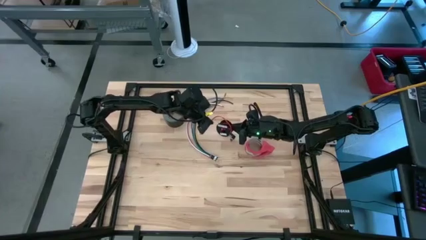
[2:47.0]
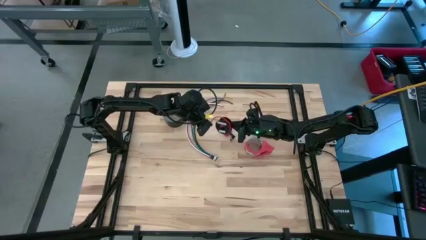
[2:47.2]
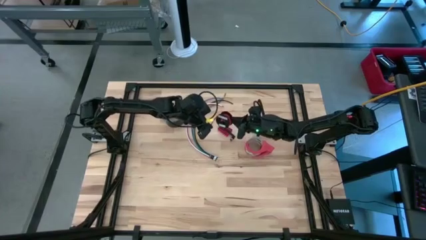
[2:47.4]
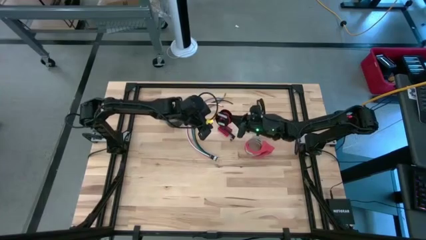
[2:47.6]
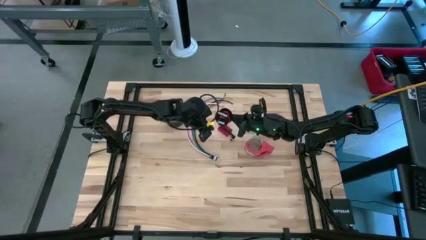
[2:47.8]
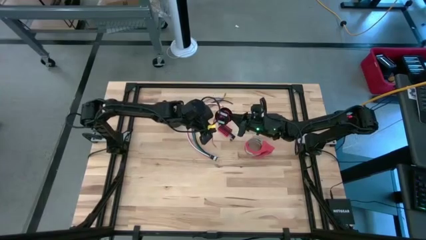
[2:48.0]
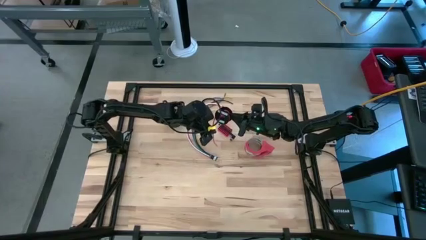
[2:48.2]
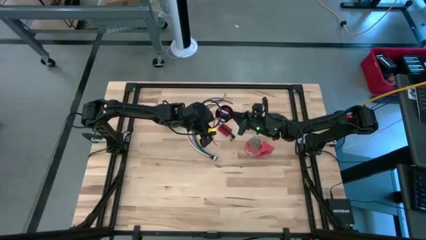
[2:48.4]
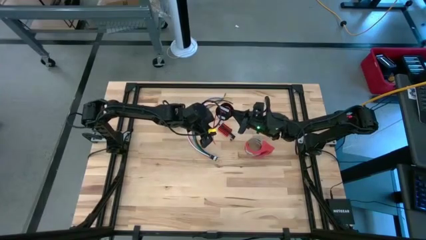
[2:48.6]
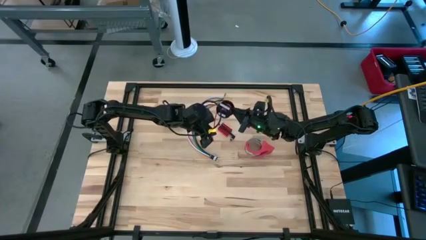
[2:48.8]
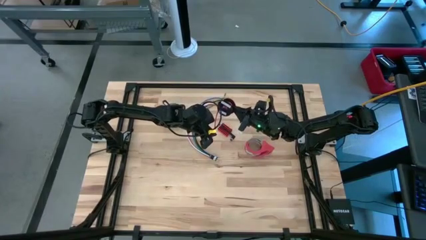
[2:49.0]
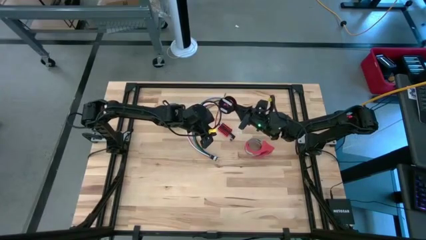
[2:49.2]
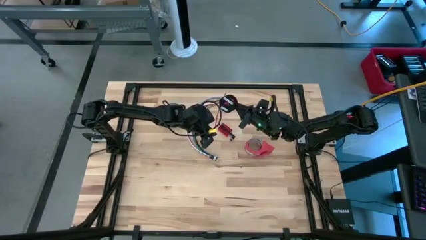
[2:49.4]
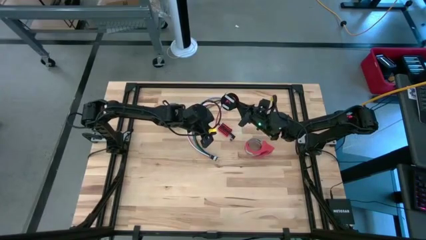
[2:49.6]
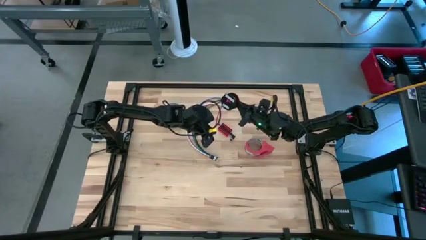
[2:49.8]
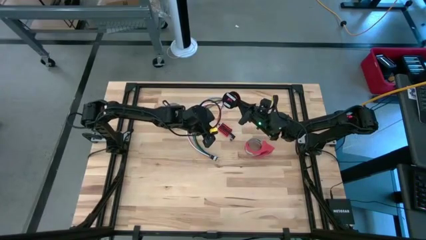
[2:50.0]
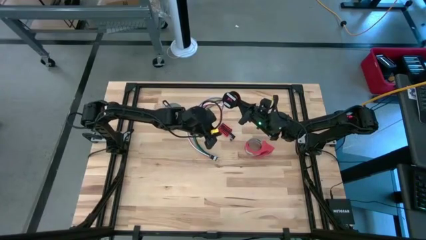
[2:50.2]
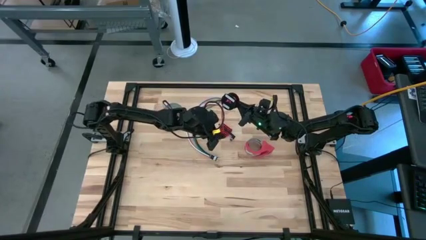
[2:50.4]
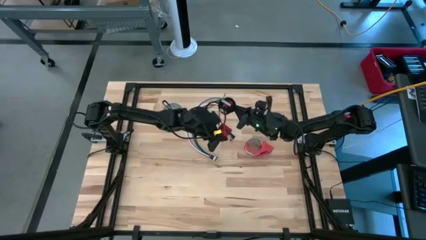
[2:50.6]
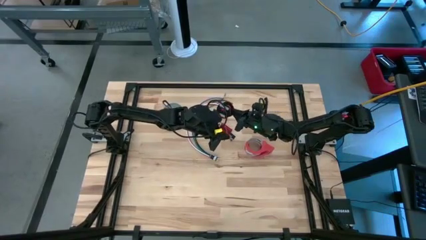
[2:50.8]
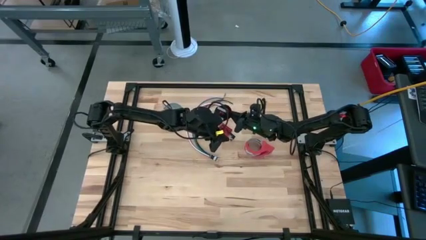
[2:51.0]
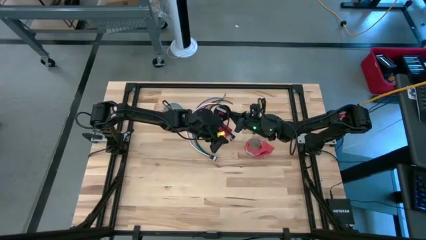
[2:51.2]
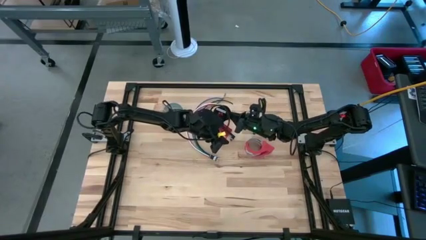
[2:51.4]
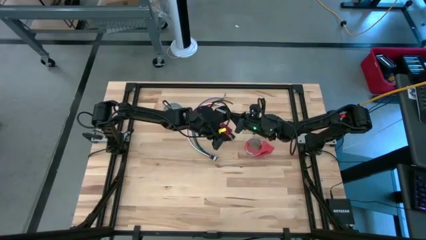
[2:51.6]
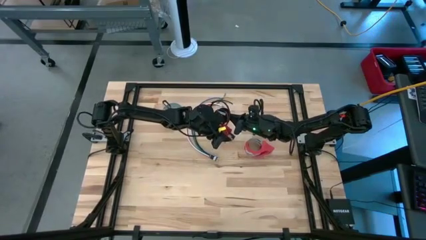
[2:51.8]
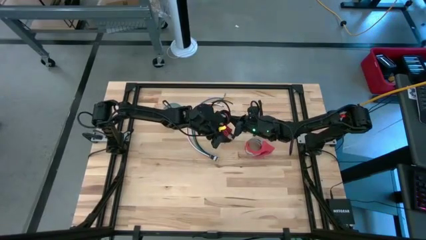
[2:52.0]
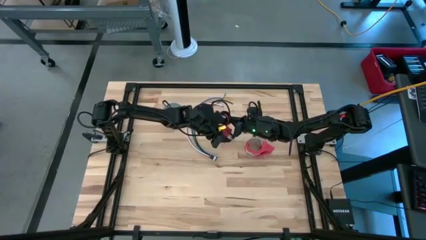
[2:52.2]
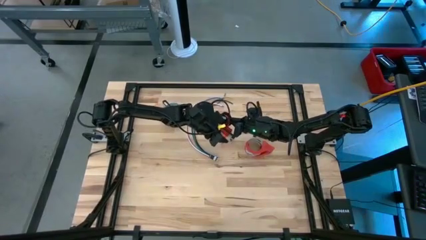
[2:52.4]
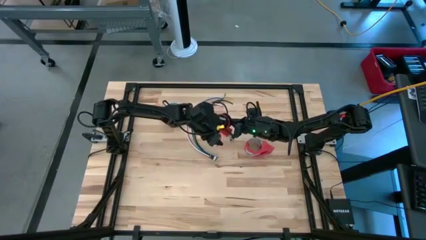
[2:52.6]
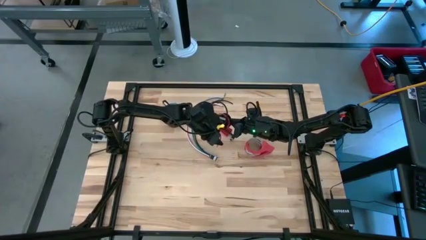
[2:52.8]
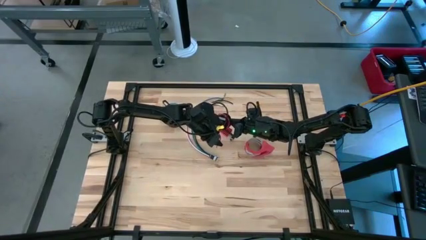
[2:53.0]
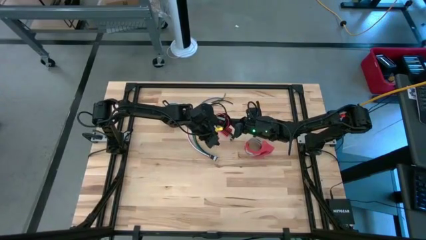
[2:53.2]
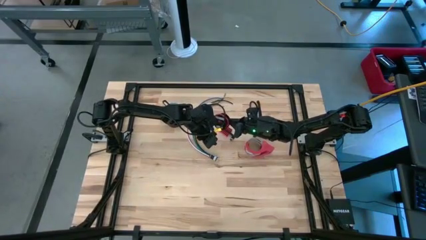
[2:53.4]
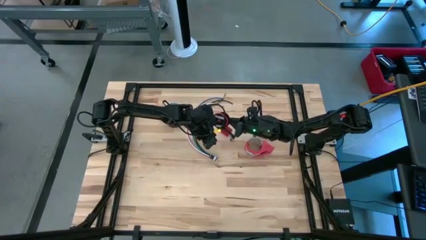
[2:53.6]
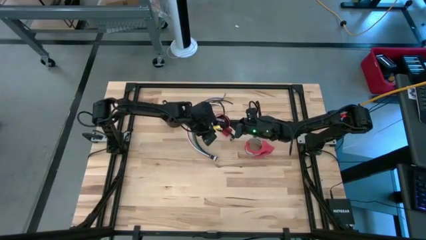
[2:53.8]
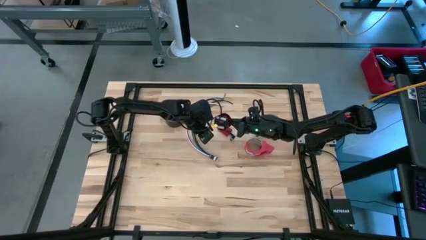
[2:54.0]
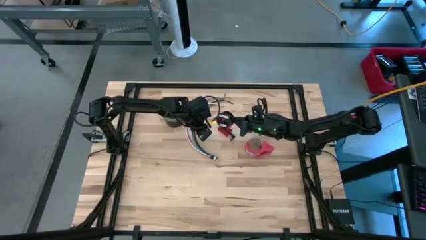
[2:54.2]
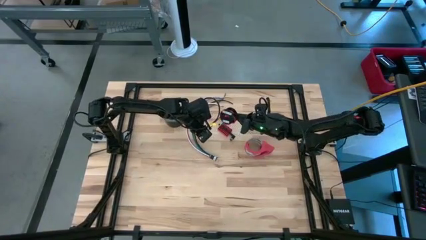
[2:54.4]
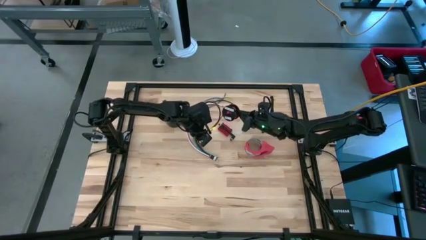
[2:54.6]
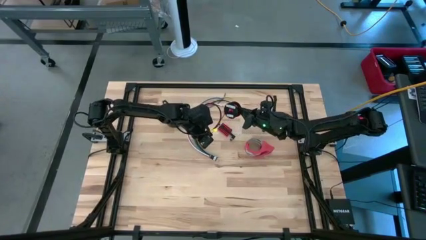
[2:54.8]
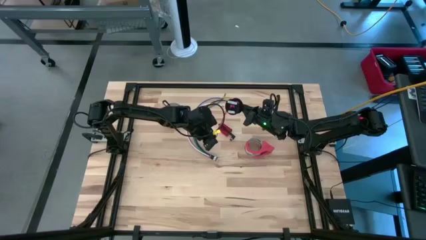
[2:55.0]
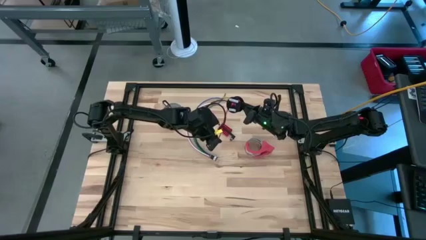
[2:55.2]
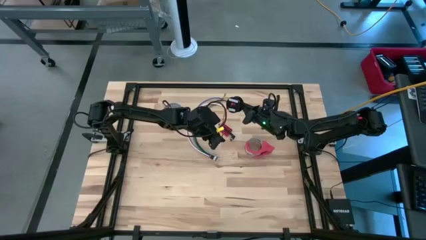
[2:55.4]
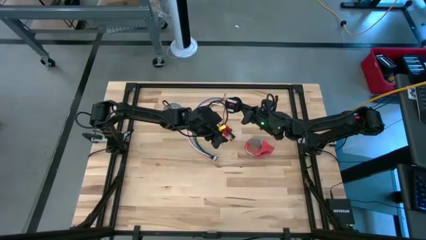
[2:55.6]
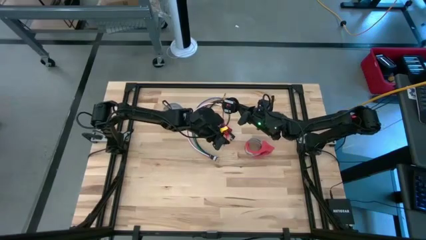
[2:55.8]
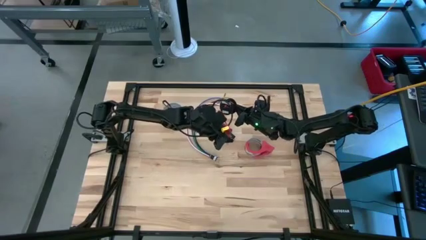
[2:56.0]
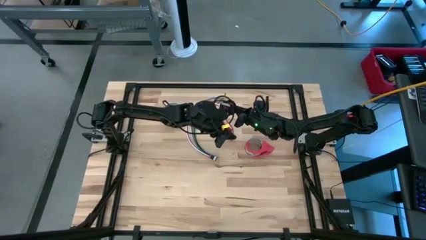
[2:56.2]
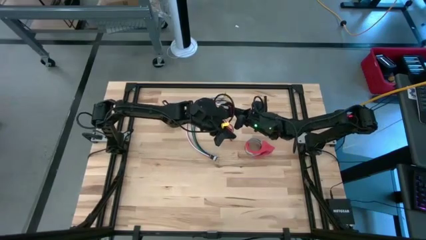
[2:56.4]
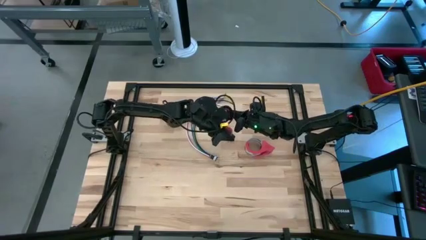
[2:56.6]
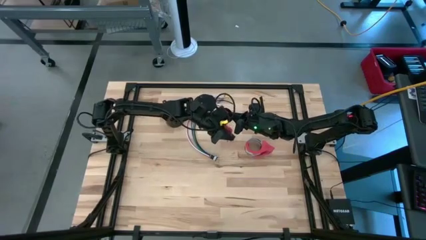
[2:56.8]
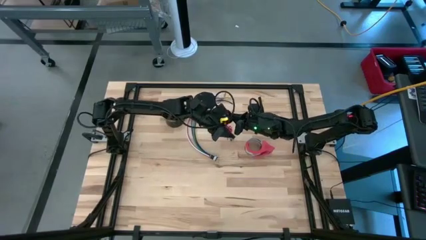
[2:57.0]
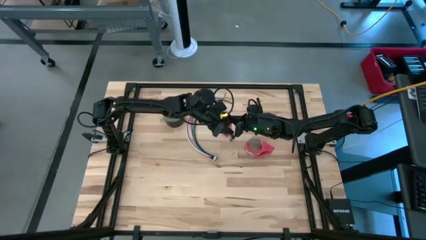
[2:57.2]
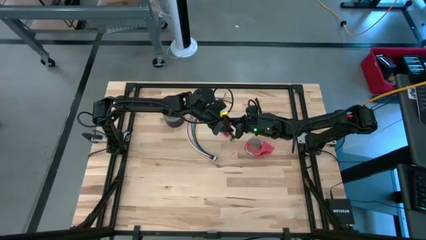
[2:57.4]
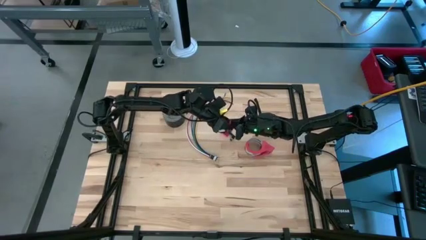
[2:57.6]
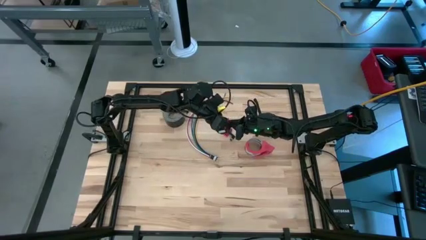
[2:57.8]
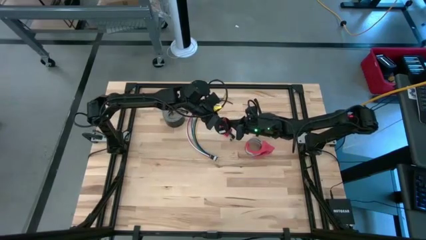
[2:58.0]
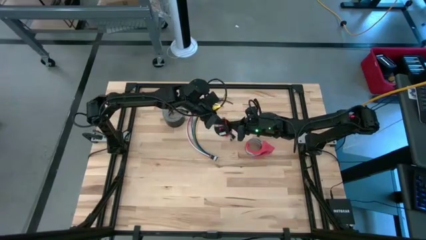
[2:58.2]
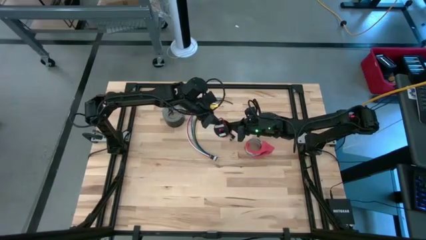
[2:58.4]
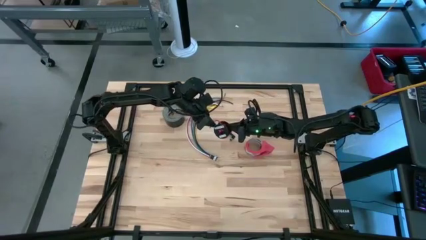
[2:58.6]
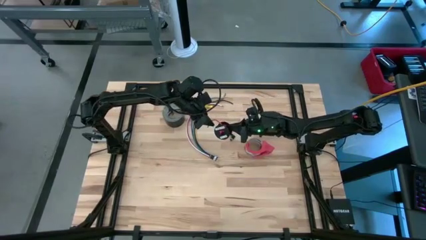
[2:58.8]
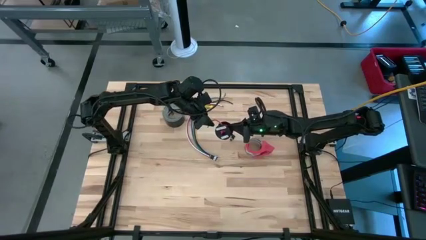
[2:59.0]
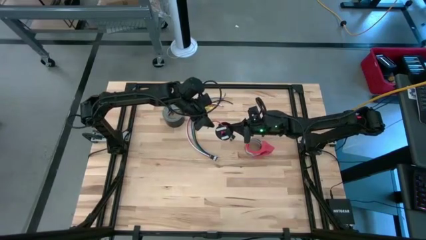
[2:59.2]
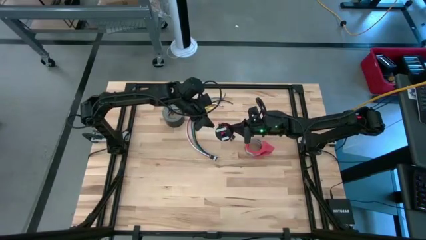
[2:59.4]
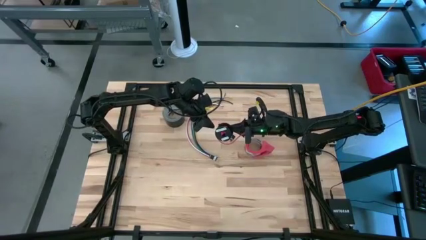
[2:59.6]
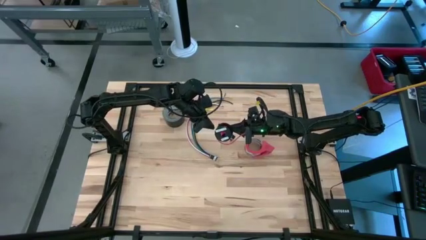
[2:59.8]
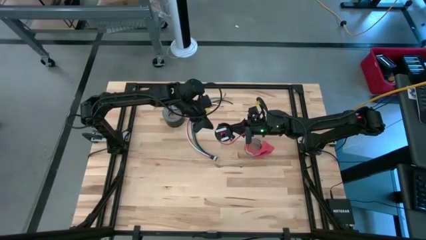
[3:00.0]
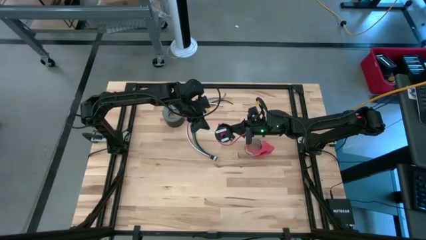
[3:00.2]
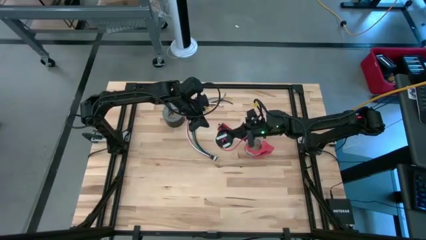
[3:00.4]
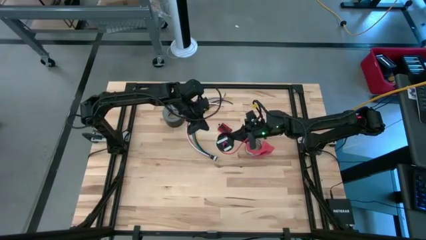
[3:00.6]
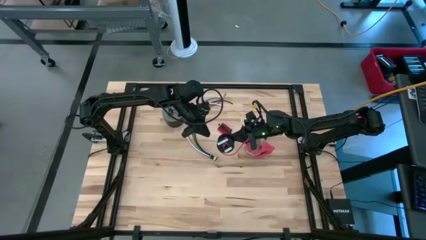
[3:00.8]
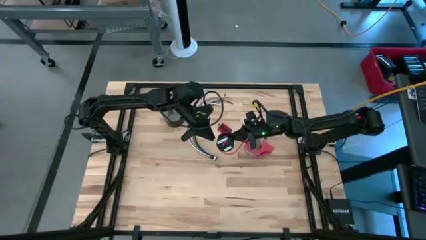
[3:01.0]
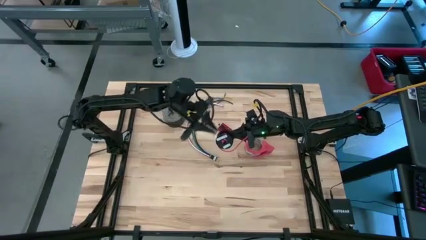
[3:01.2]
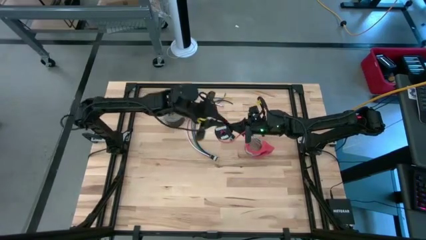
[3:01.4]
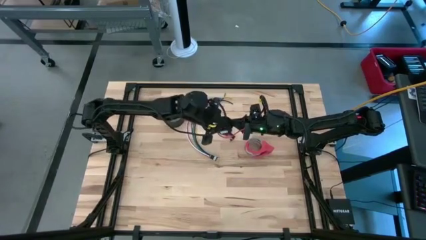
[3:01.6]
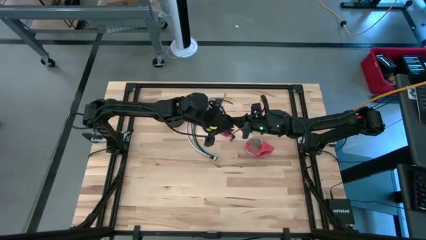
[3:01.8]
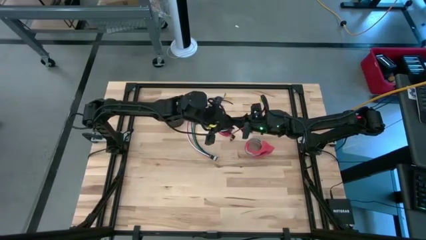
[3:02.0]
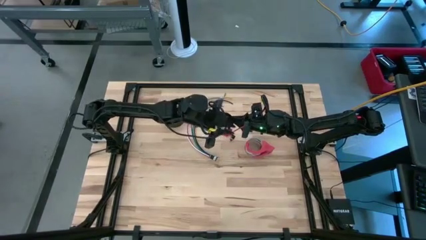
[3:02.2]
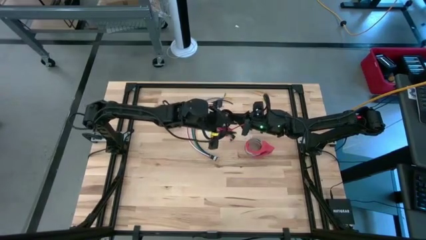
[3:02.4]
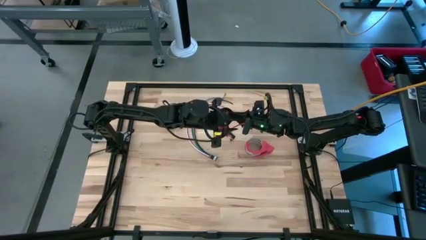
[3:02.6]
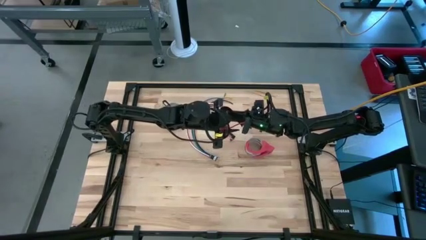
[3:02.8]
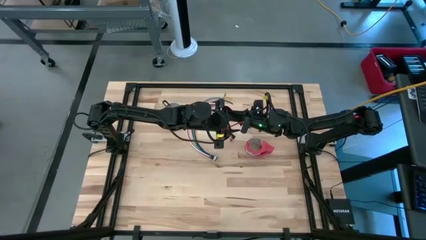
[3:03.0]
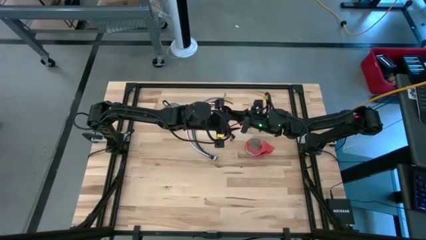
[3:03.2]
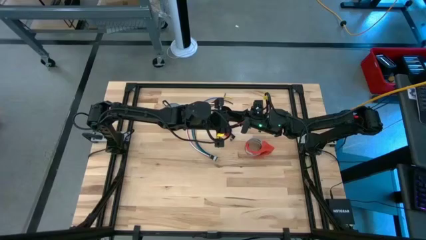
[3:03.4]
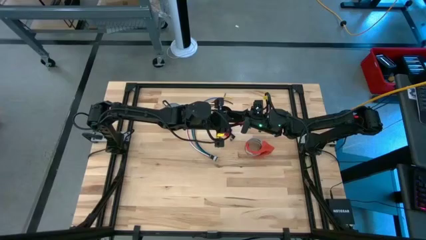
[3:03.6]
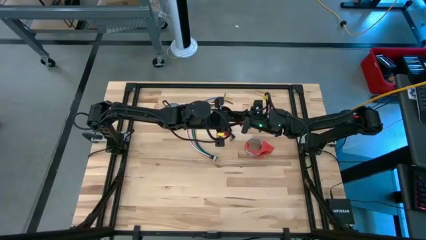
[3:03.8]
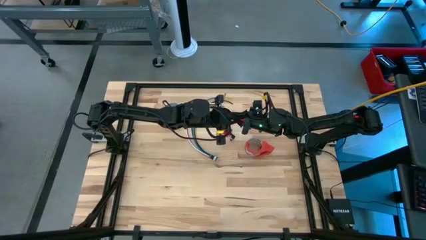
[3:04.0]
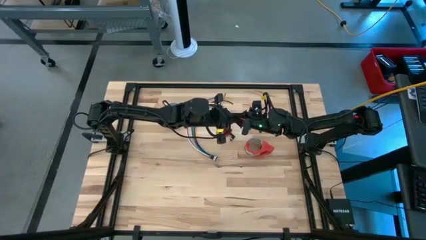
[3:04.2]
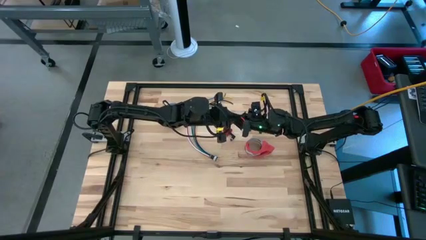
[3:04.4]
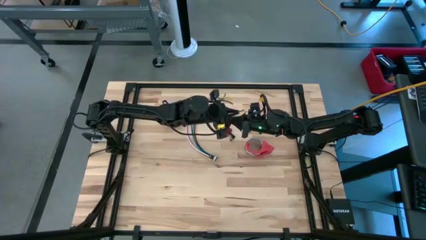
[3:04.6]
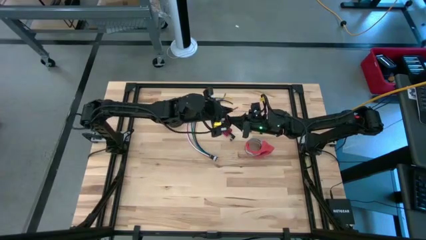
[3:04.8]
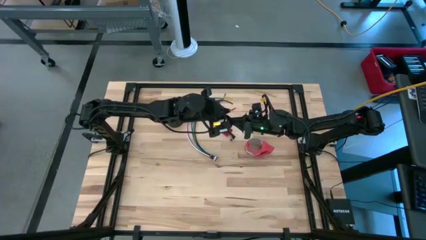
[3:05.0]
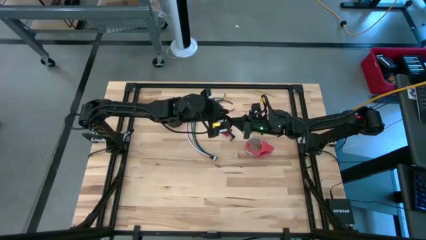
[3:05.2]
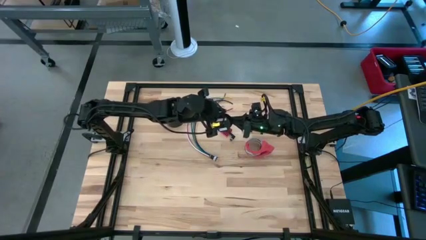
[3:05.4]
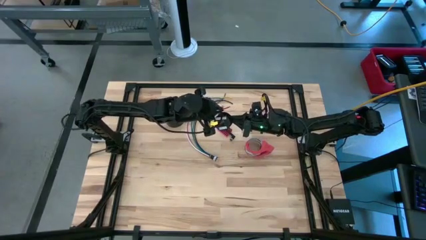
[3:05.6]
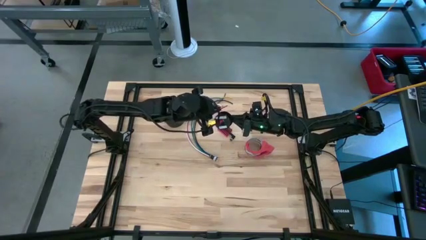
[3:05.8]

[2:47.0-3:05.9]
Task: Coil cords
Coil the red wire onto the spool
